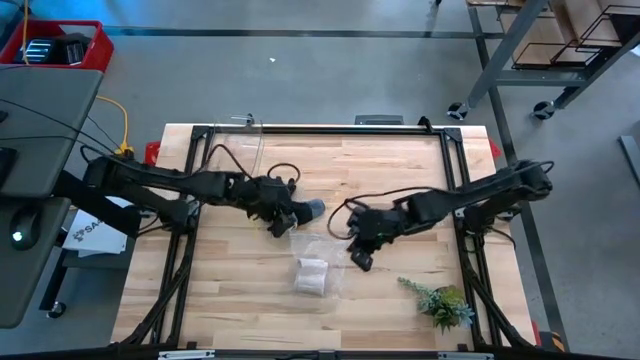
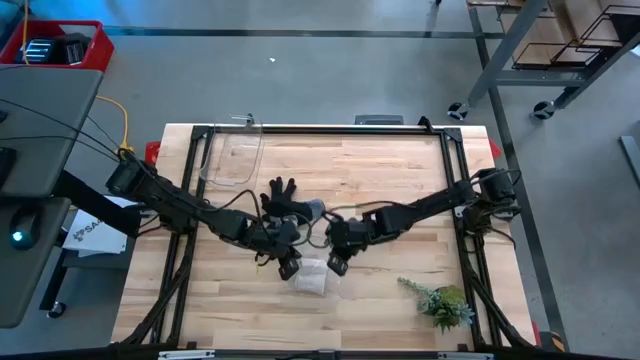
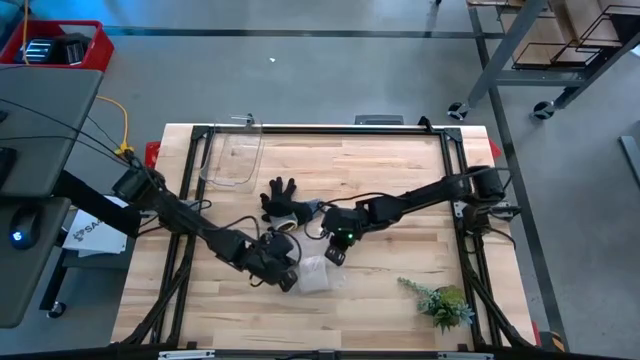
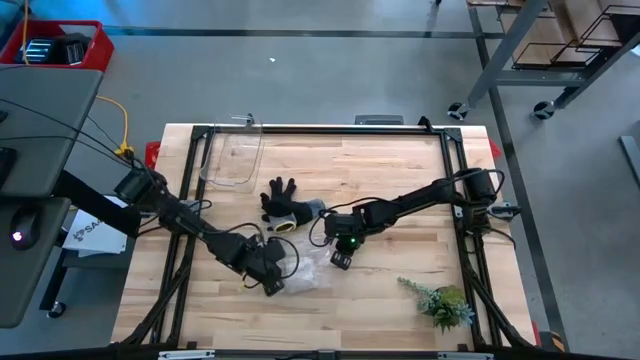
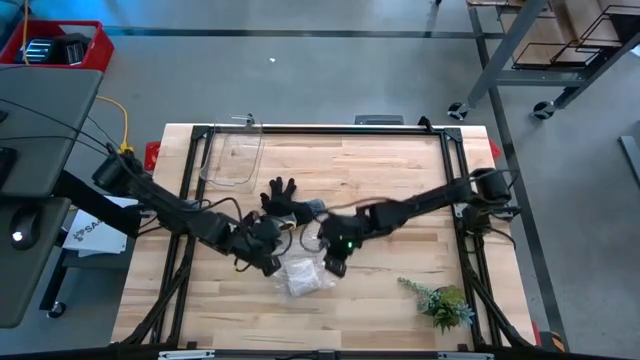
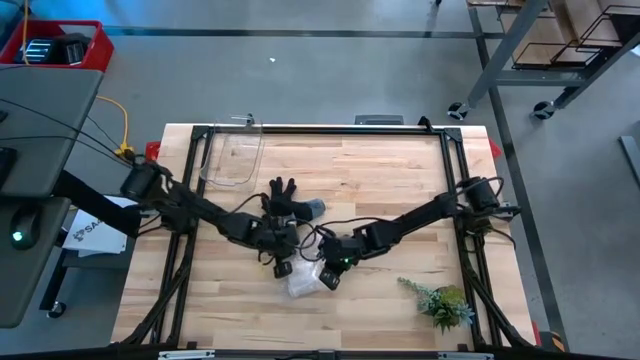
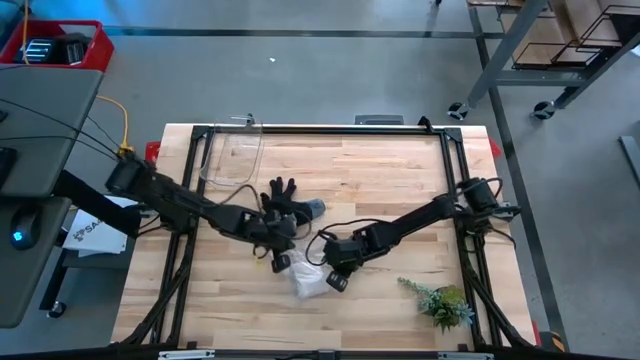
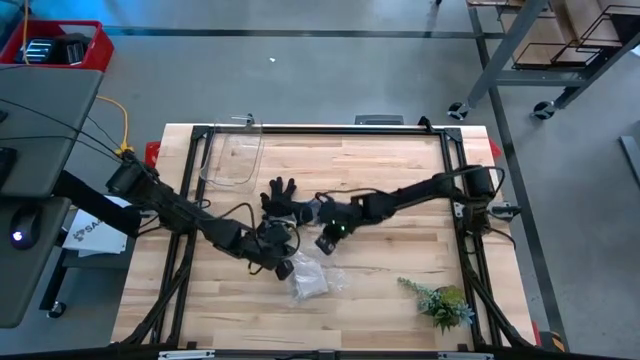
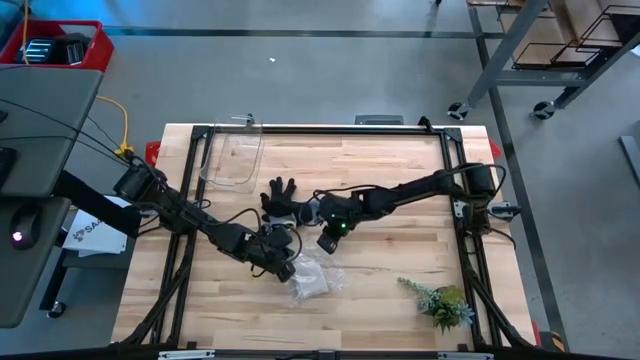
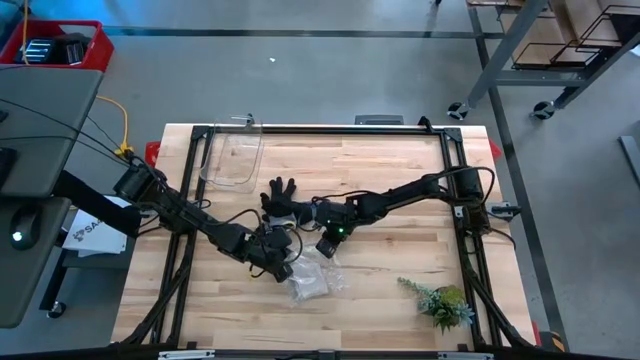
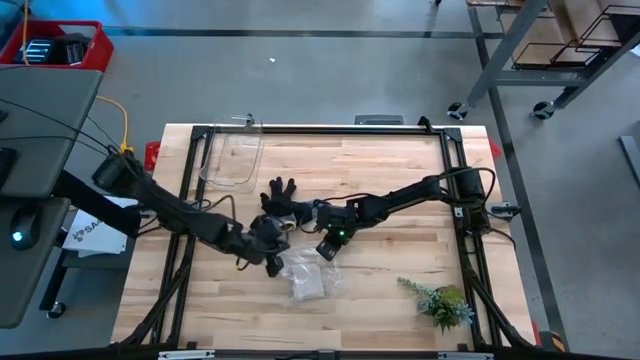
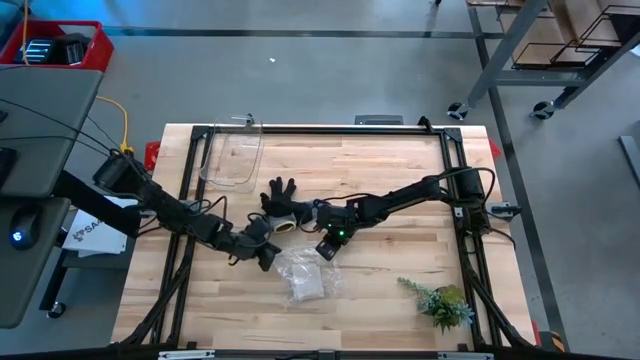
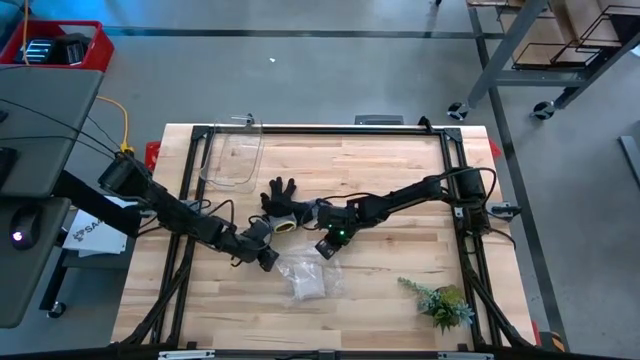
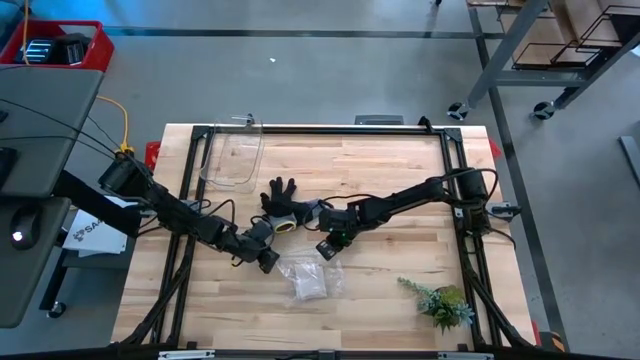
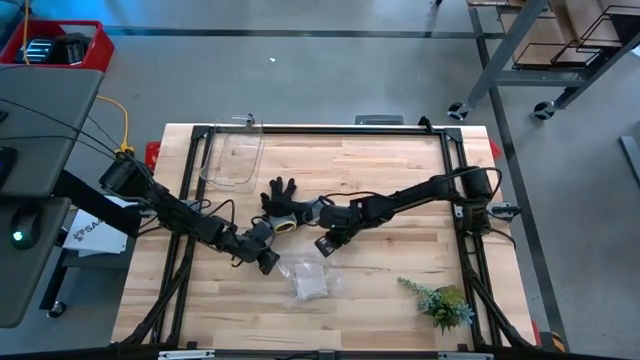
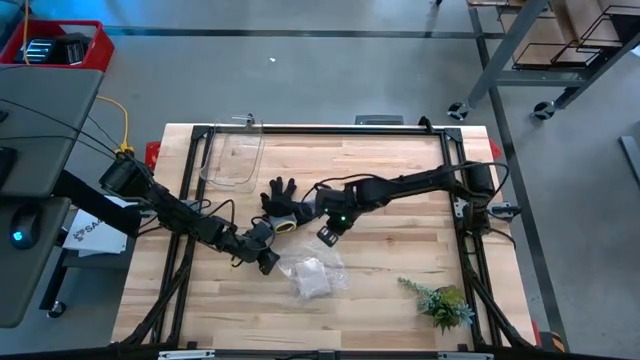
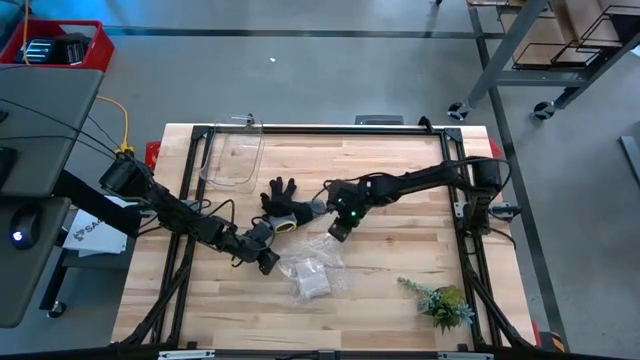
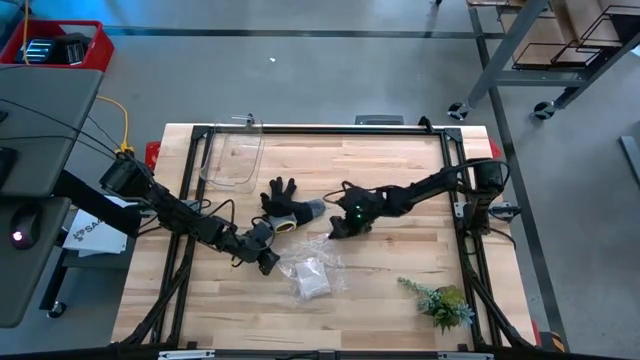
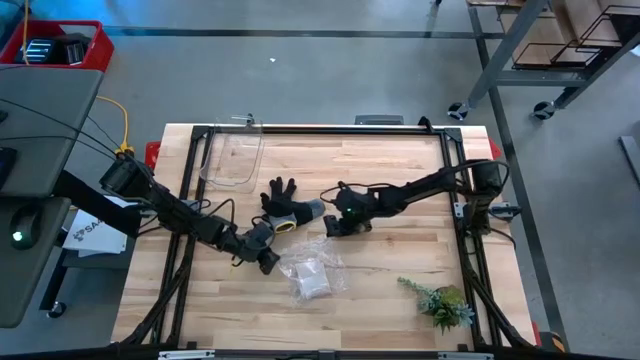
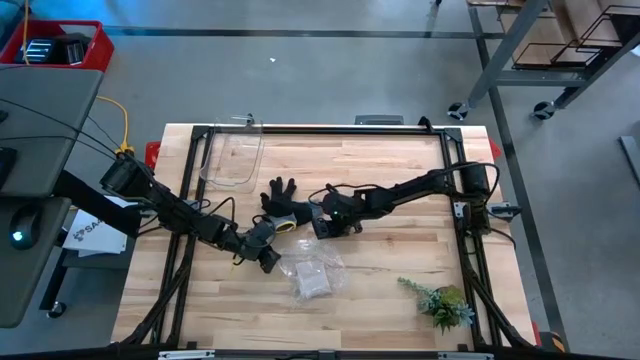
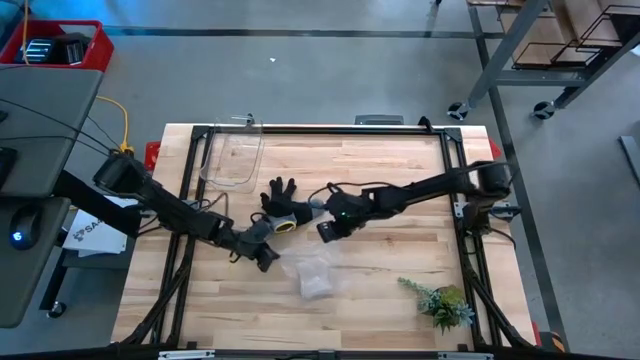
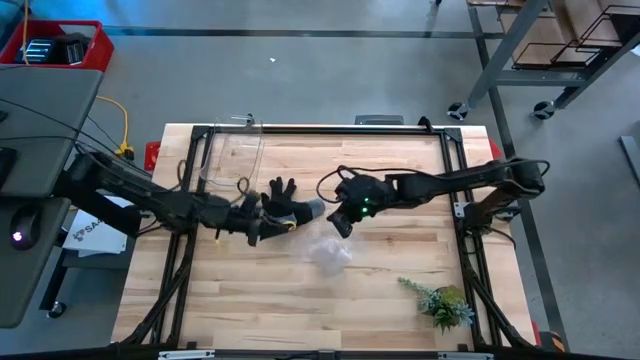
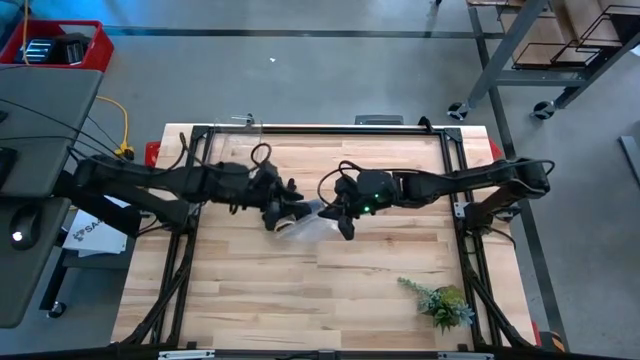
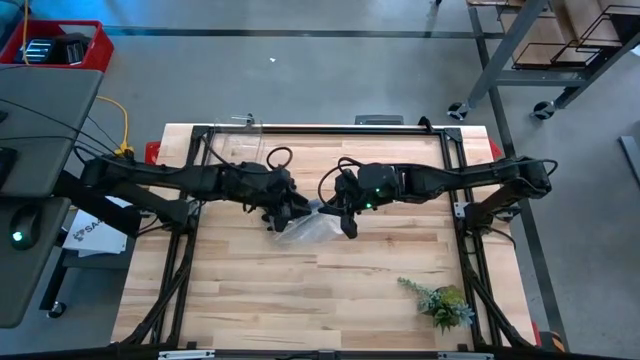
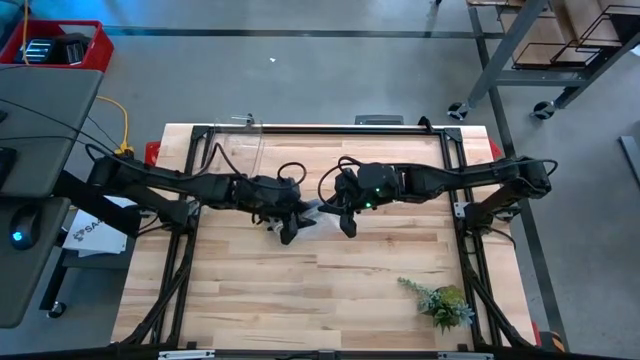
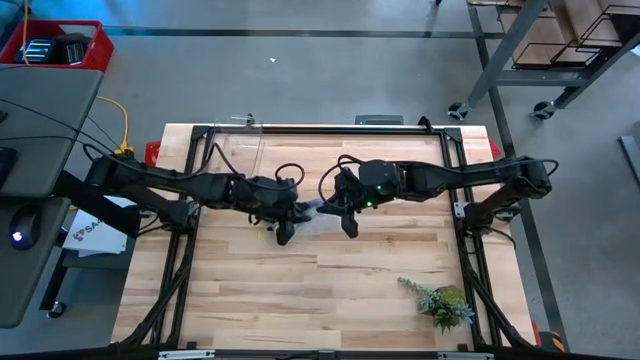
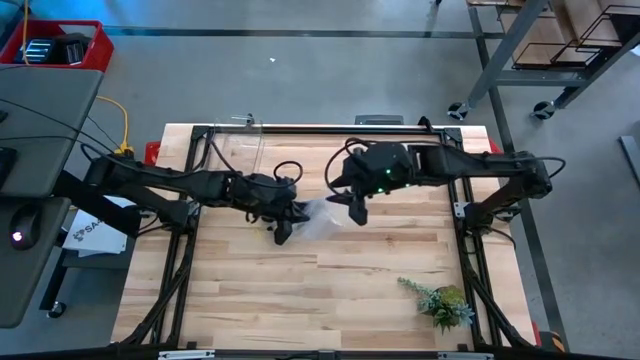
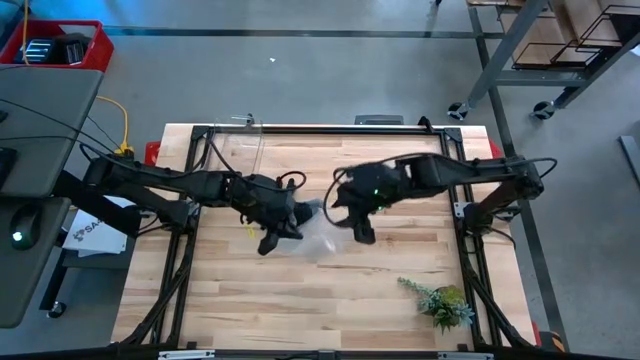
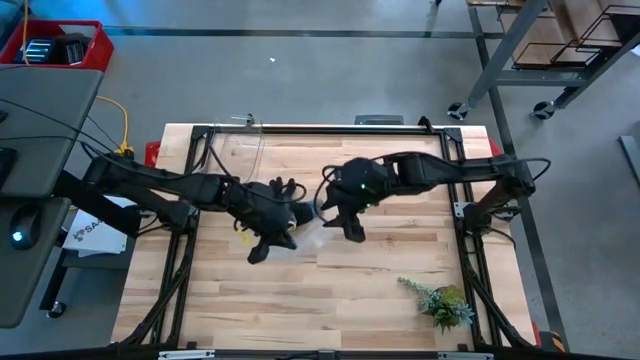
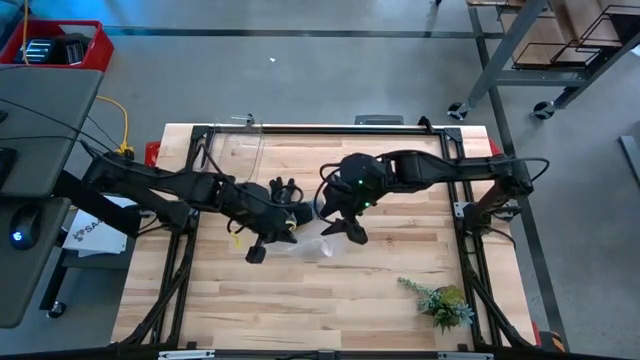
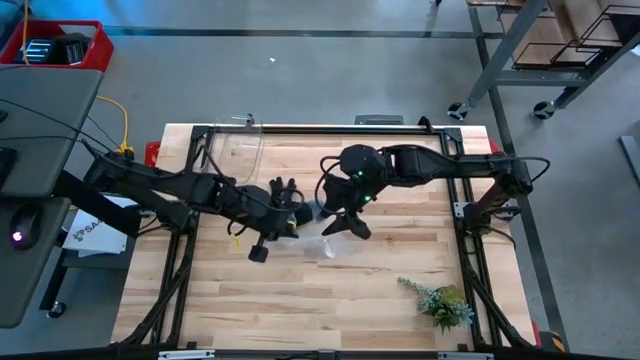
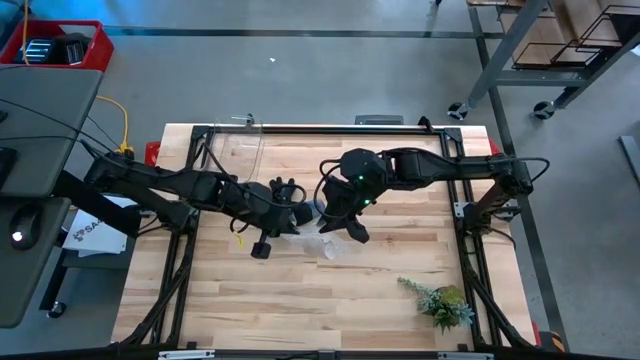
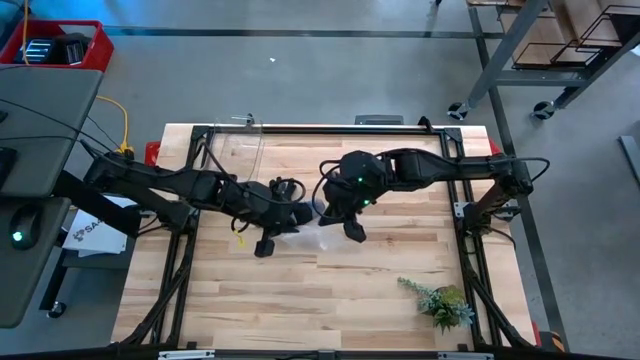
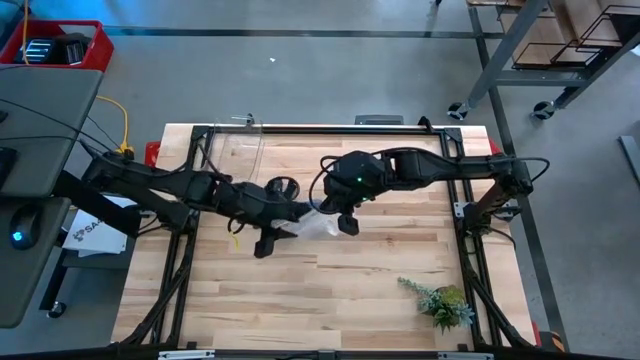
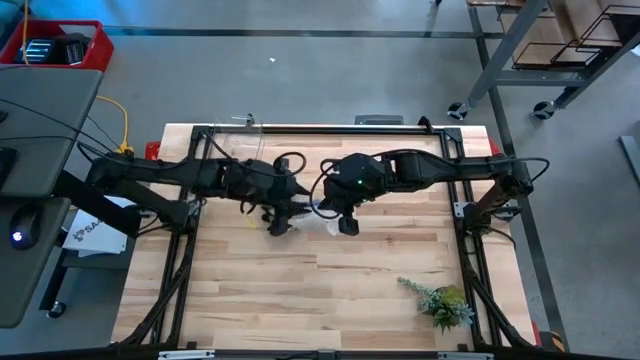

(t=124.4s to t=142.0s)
Task: Roll bandage
Close the transparent zip bag

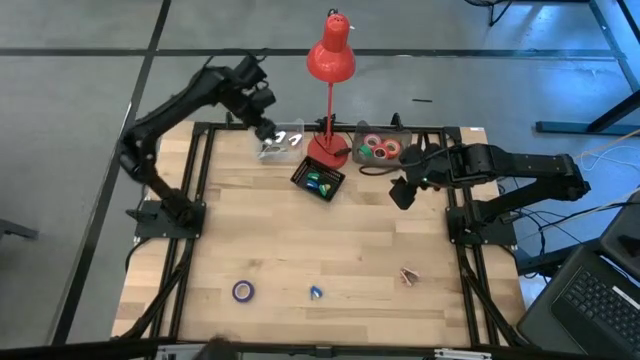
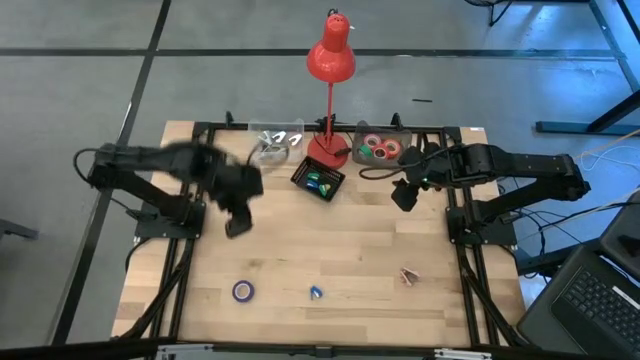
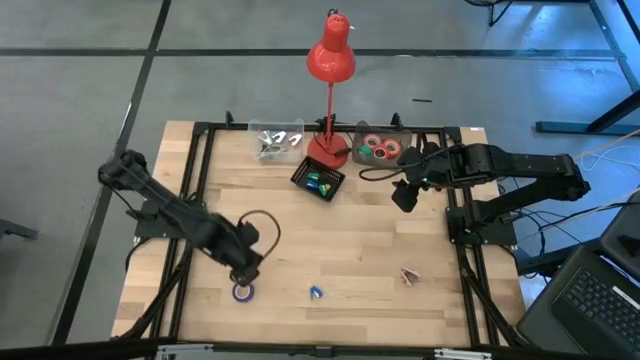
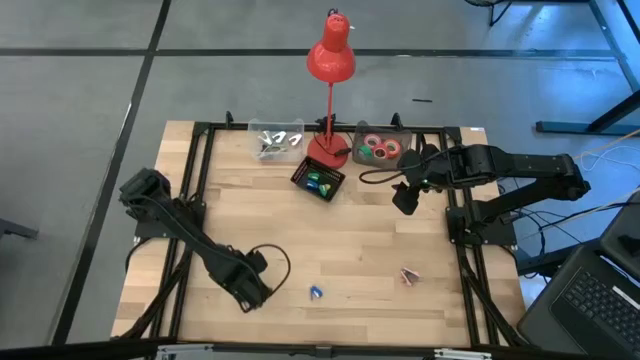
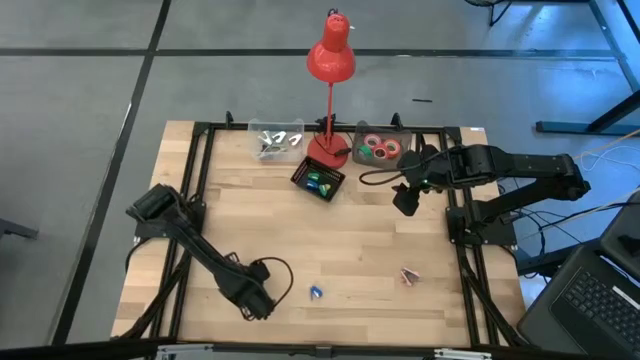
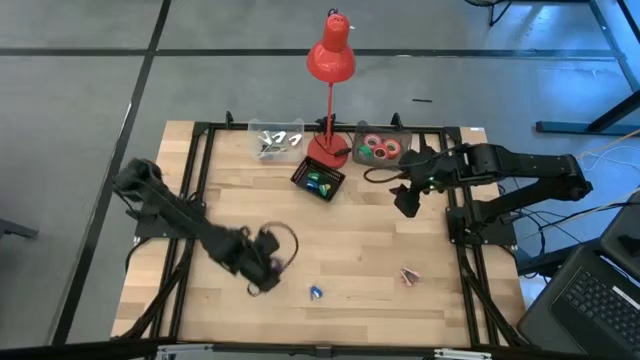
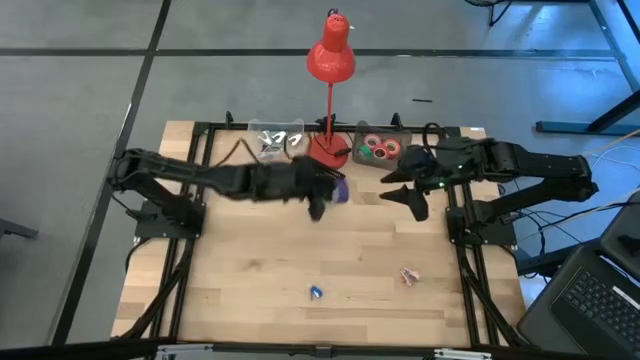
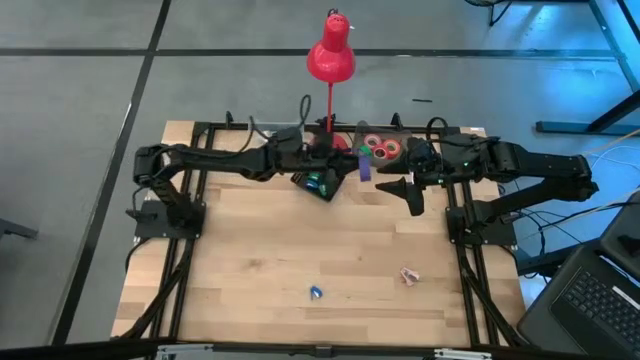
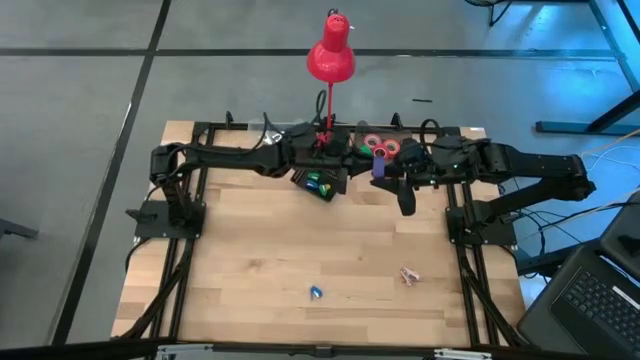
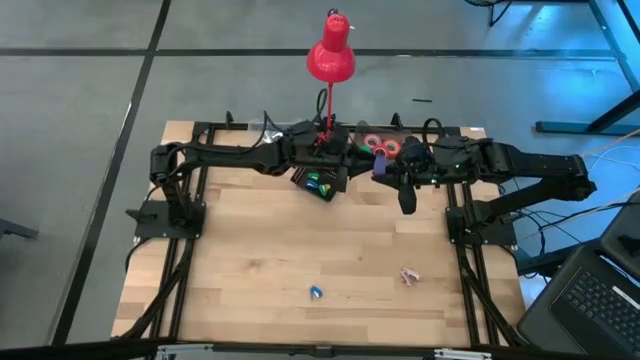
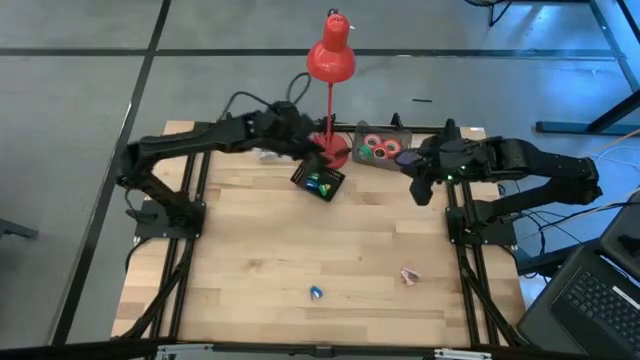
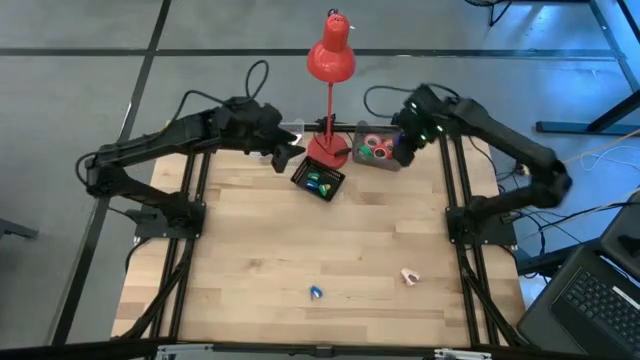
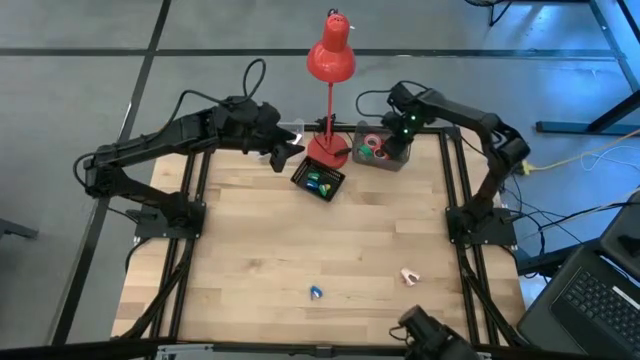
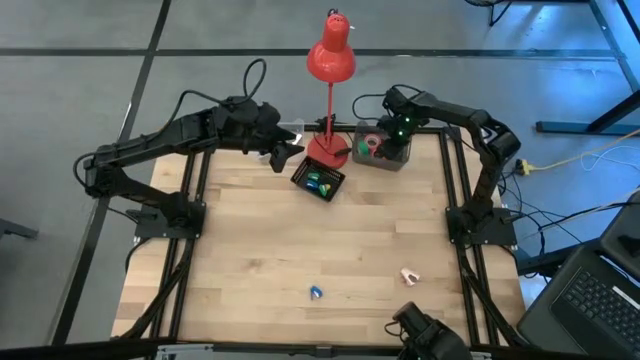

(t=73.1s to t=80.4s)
Task: Pick and place Stapler, Stapler remover, tape
Put the blue tape into the gray bin
